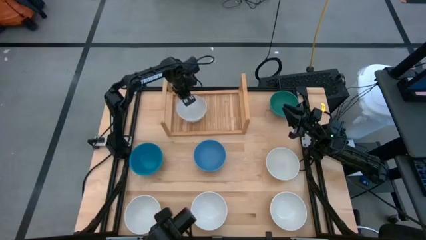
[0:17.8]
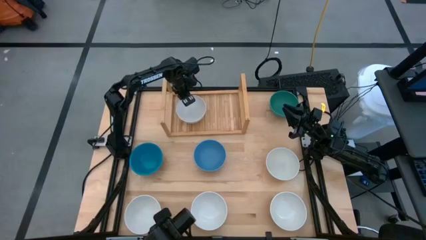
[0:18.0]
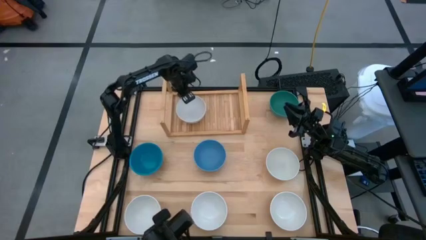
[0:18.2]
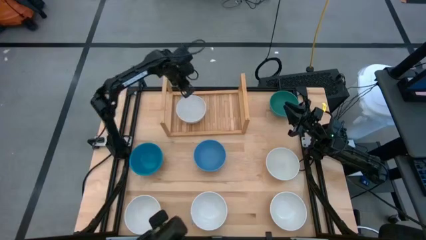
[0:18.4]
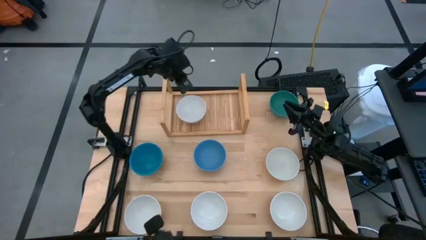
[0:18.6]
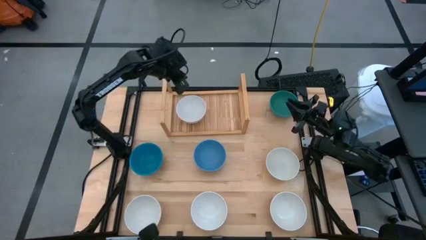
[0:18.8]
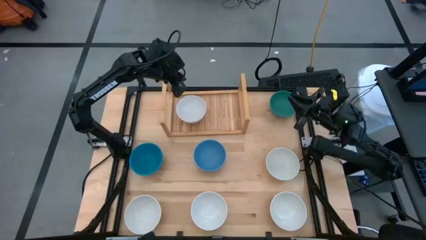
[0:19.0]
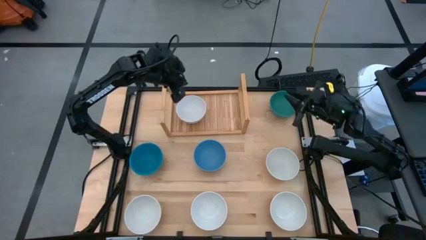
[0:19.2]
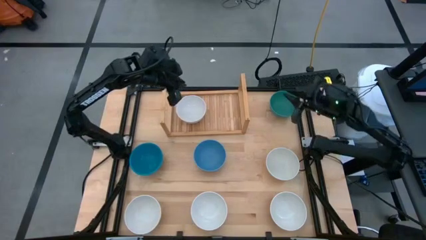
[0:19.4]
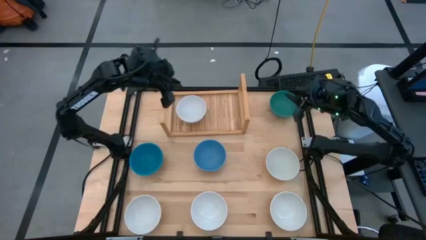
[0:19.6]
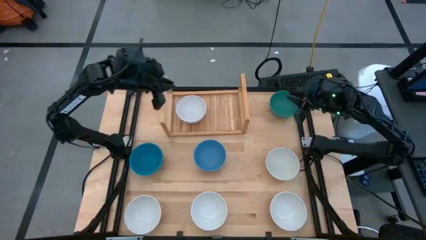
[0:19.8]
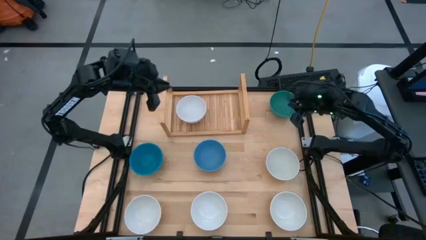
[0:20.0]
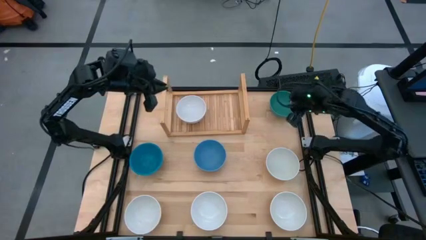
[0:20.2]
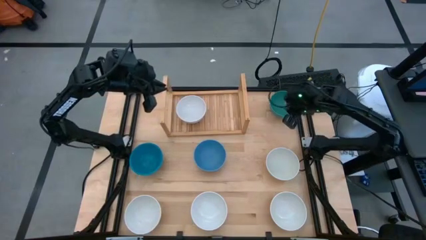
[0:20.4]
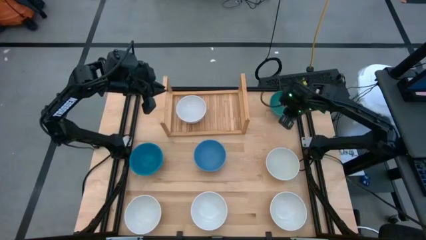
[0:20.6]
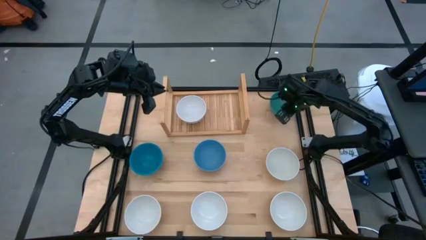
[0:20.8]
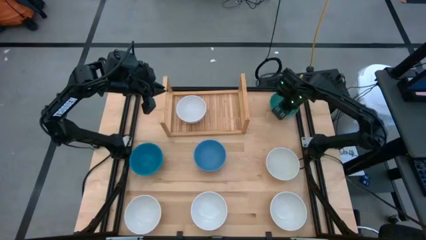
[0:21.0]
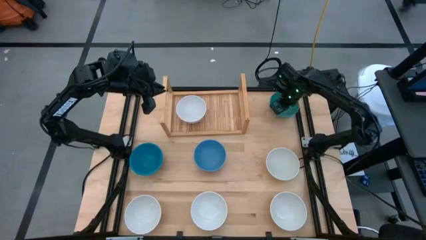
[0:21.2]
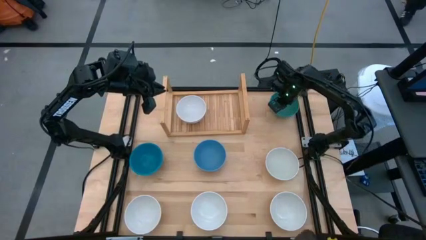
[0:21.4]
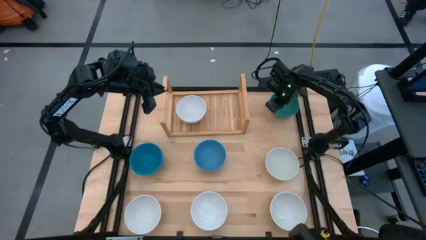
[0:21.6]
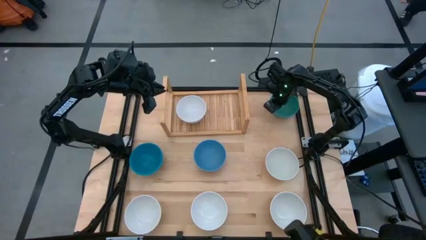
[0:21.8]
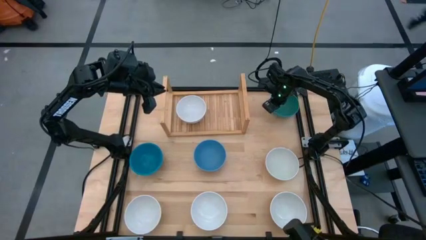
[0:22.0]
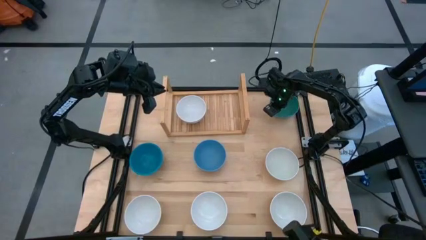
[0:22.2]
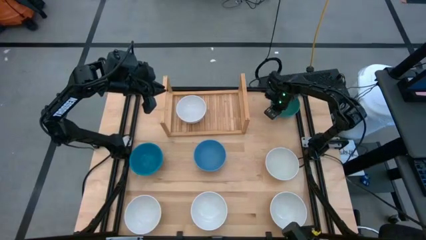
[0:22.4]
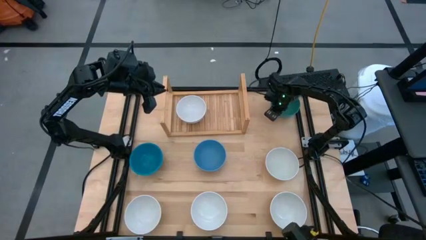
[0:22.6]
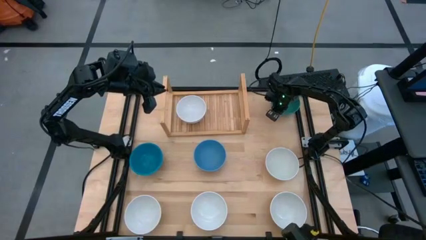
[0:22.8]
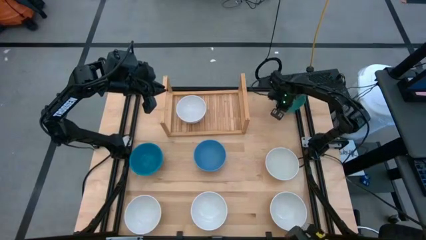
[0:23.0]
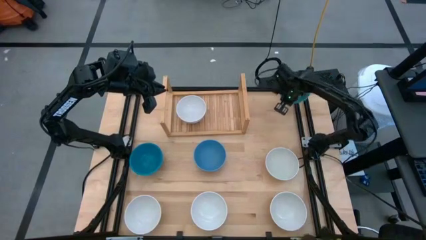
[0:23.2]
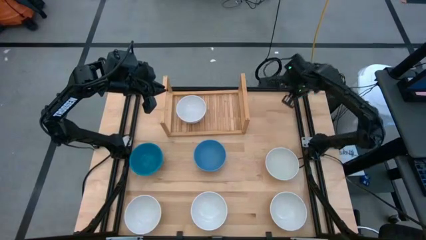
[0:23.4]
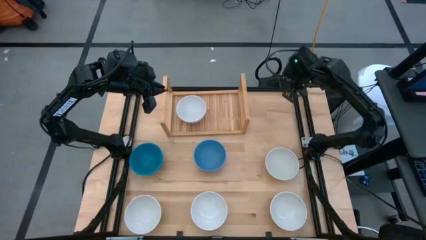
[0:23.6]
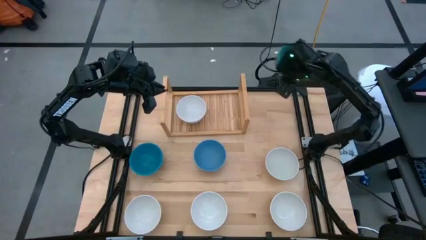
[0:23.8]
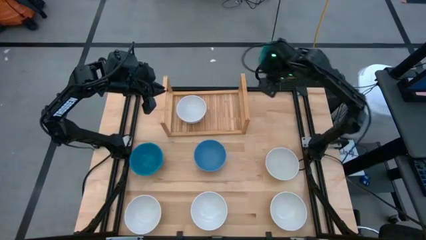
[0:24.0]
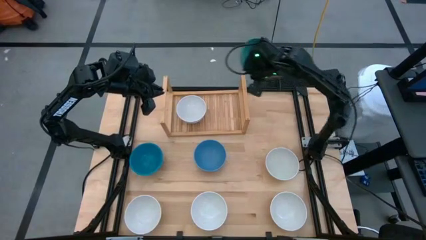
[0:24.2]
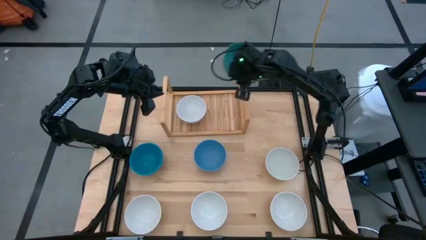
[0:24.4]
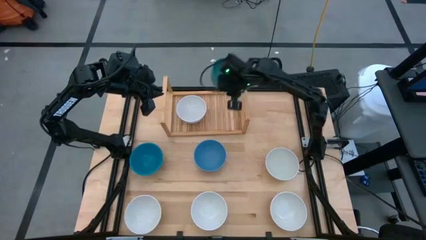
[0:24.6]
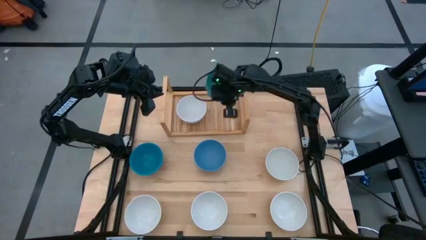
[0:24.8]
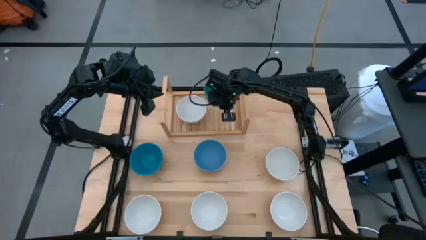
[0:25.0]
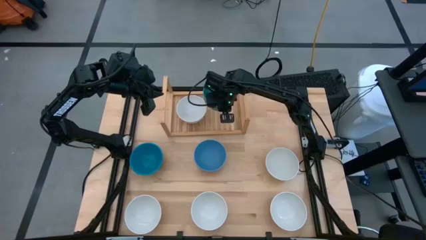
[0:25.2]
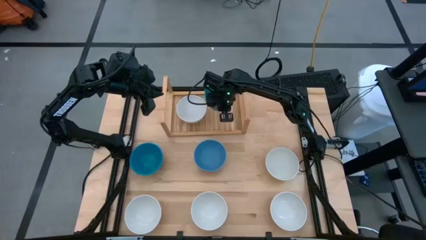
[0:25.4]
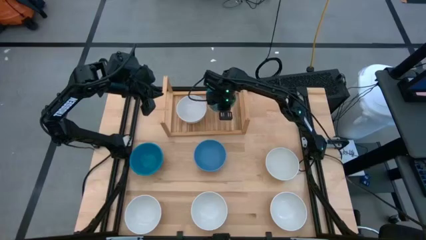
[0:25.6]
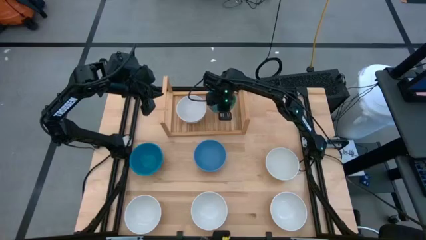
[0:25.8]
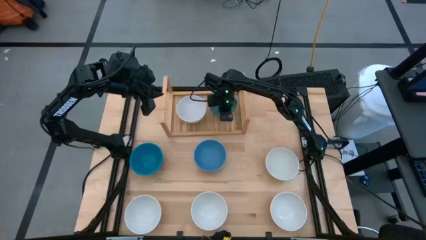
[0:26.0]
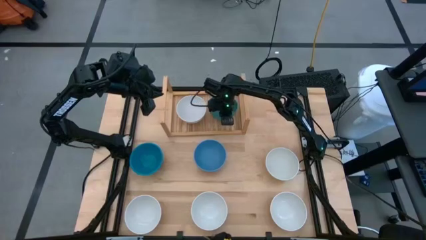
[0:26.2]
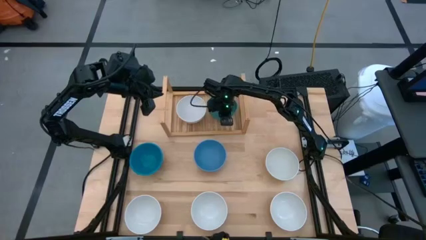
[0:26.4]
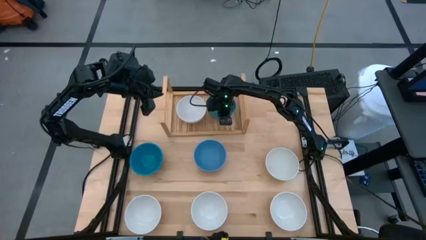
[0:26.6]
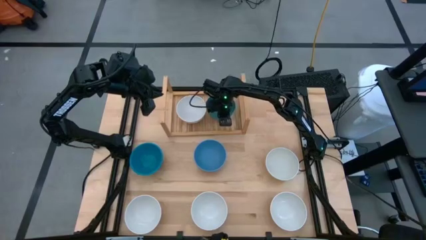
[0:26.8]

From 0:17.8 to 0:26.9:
Task: Place and stack bowls onto a shelf
Put the green bowl on the shelf

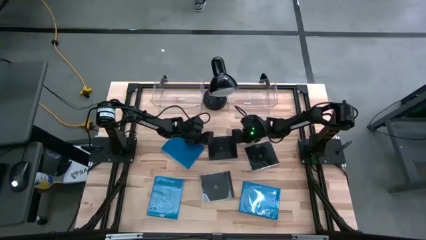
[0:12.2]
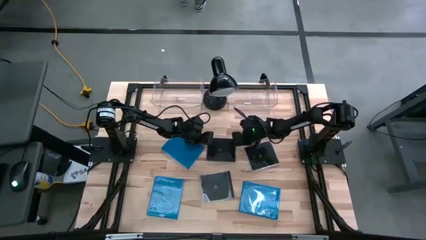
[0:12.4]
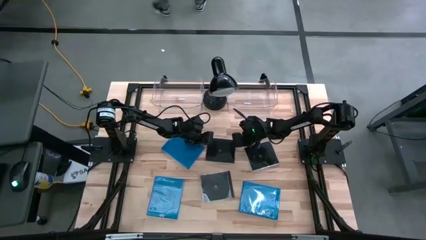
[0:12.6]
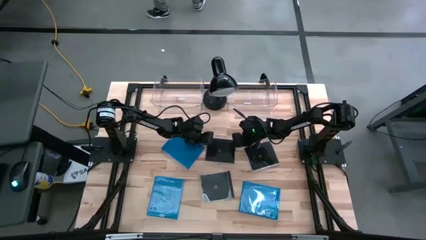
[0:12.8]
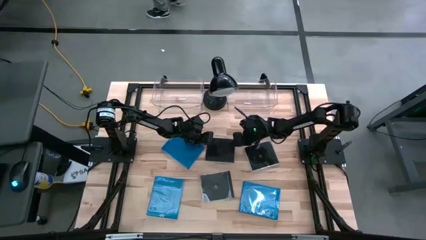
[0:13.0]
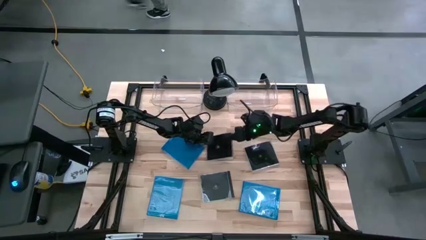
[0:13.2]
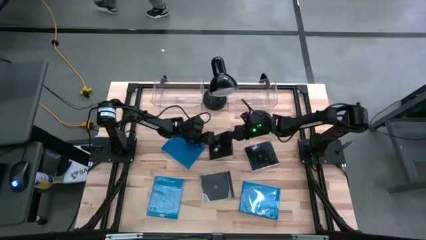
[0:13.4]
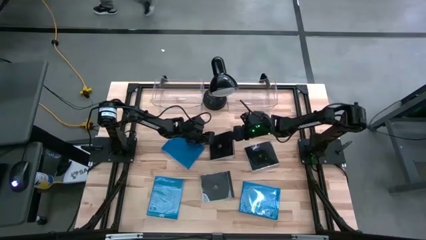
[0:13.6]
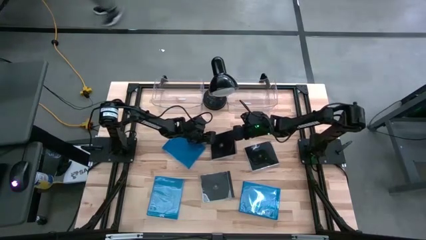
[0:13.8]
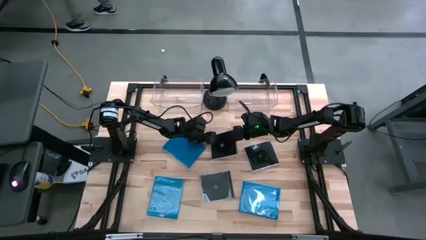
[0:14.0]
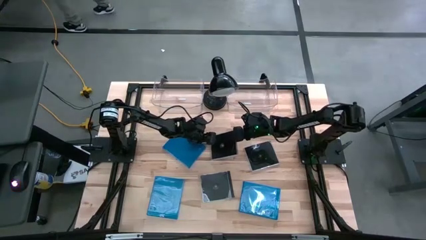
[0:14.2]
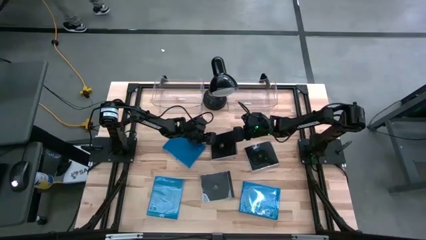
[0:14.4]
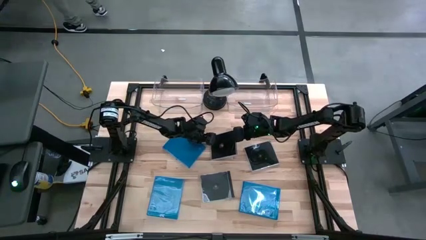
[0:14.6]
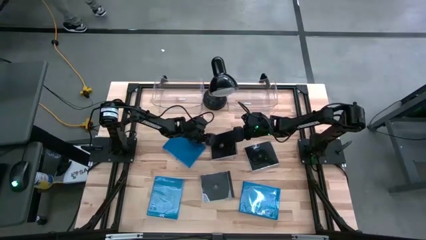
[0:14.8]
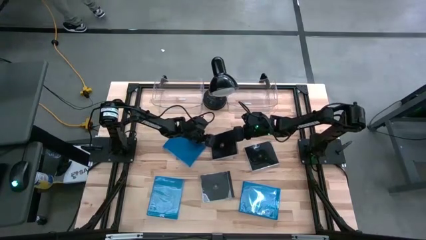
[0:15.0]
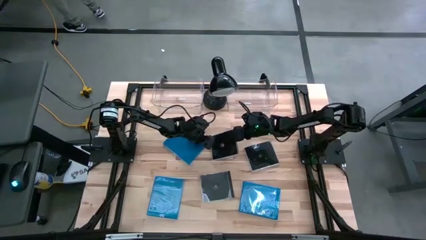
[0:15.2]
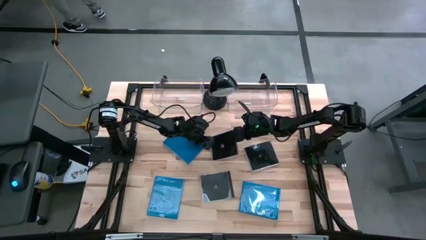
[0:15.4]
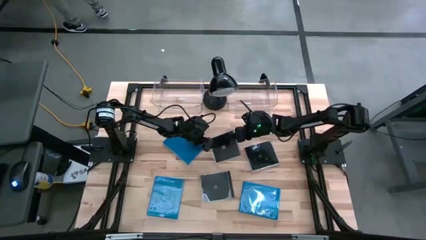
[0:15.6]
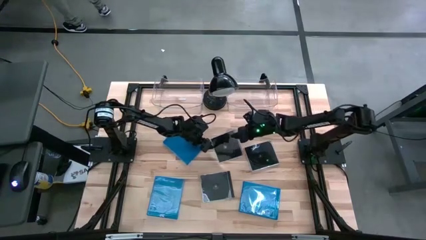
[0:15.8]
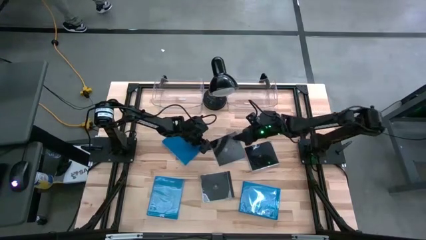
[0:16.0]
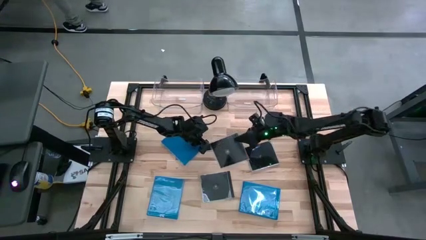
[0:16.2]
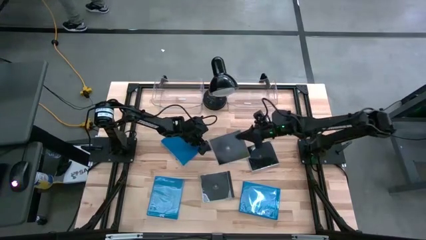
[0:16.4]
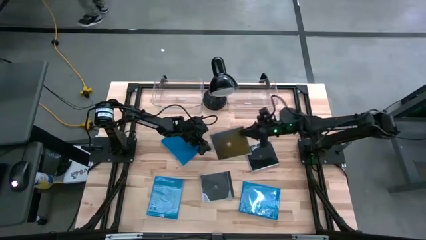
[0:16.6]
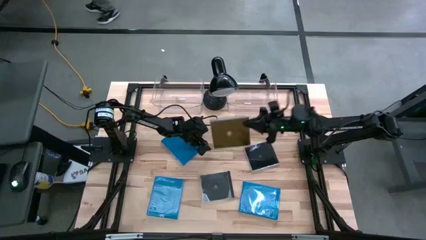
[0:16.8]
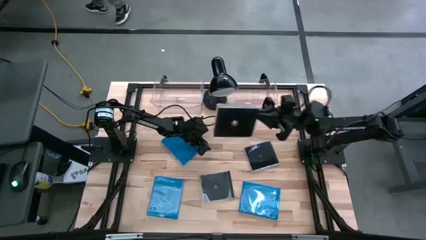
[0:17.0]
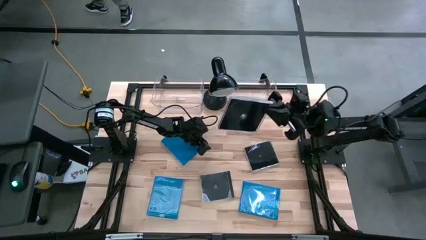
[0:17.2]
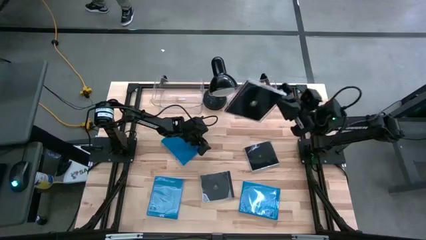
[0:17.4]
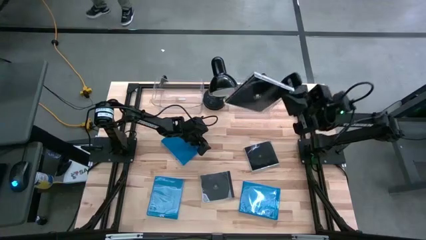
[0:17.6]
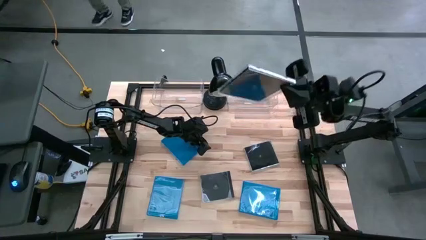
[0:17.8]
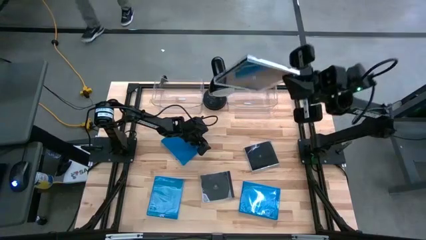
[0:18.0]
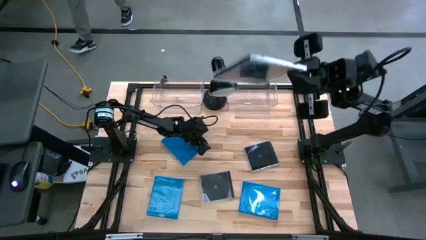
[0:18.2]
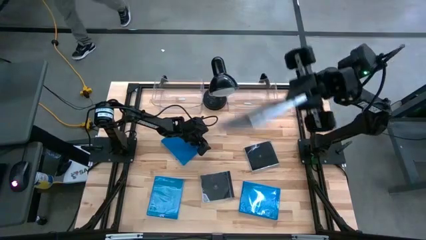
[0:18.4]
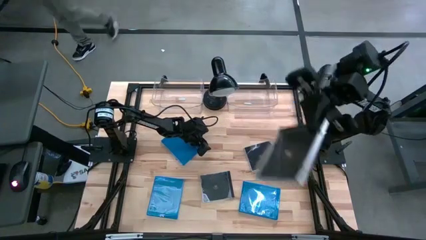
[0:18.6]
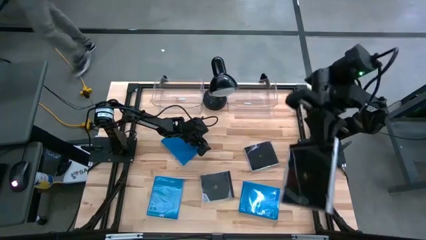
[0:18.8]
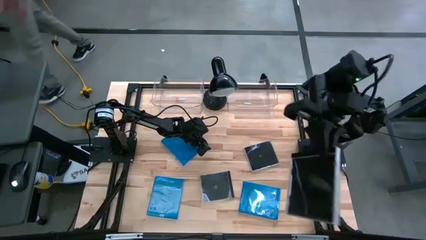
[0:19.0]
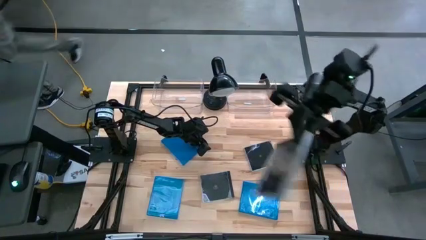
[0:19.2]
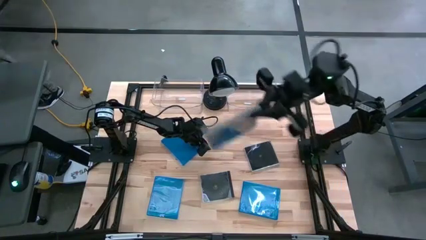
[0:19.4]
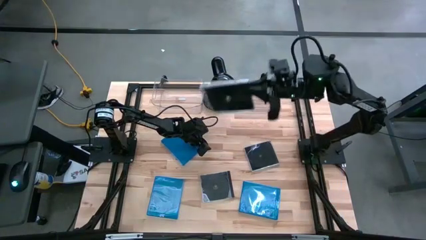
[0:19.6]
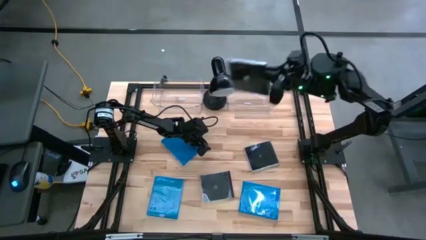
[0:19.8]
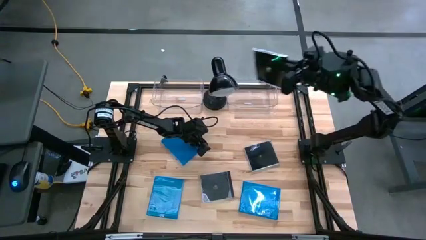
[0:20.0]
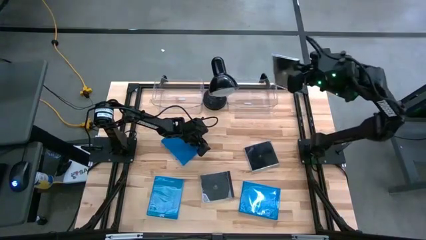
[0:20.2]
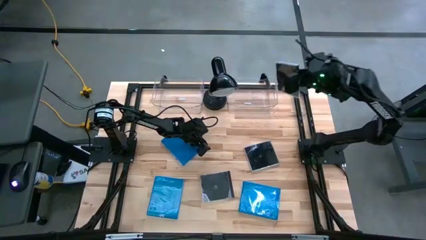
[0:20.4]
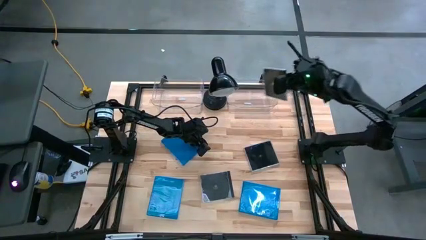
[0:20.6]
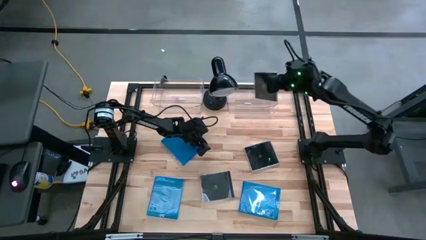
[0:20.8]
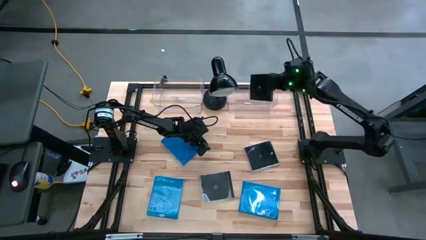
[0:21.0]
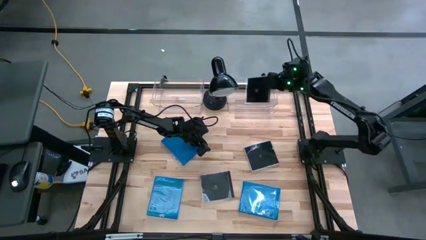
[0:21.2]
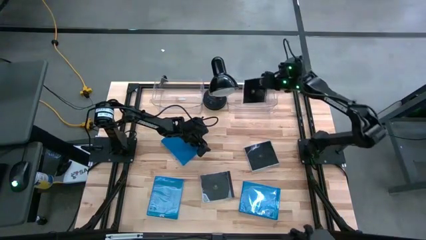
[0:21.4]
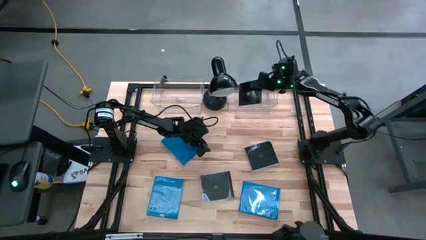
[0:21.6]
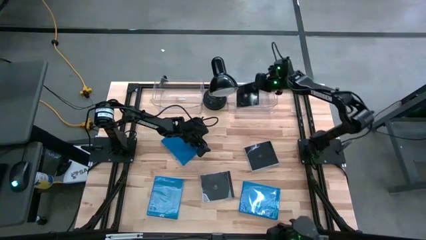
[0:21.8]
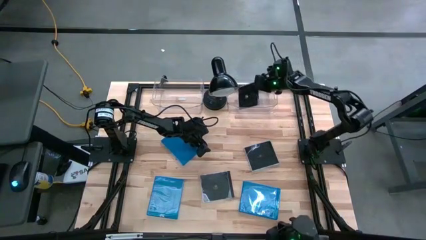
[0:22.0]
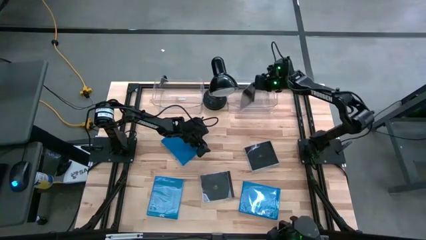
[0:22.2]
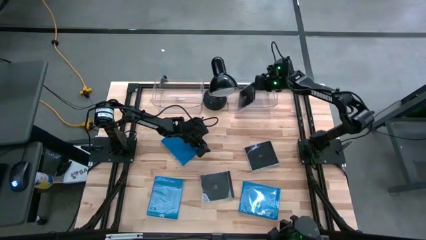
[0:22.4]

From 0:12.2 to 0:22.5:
Task: Pick & place jewel cases by type
Put the top left black CD case into the right transparent bin
